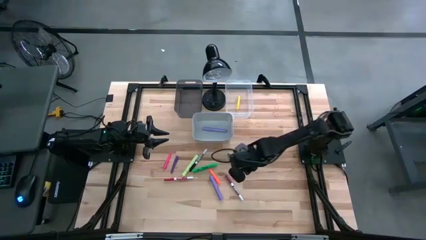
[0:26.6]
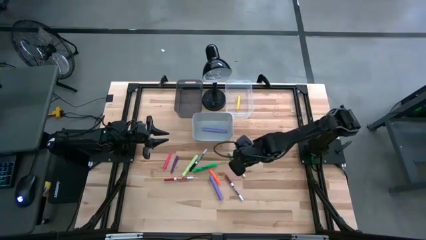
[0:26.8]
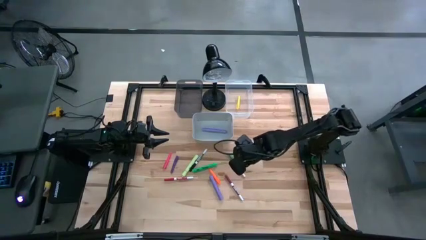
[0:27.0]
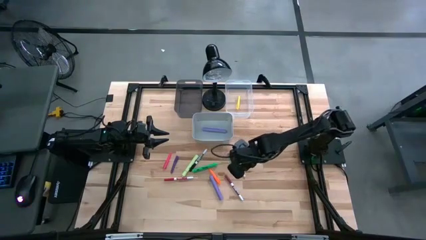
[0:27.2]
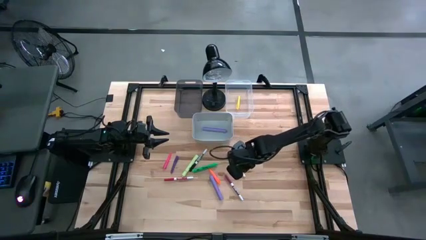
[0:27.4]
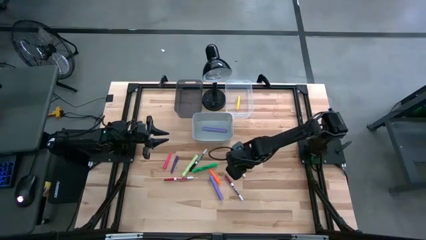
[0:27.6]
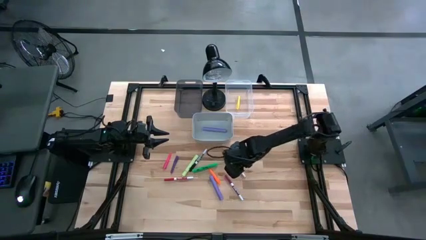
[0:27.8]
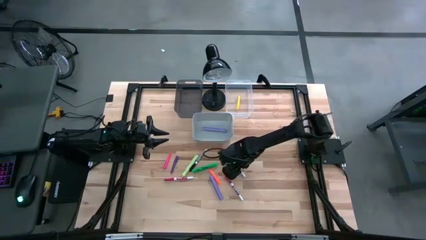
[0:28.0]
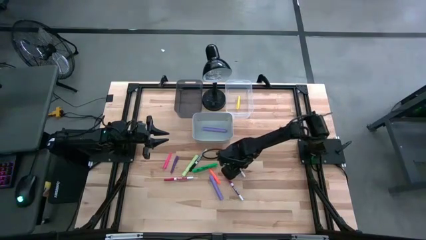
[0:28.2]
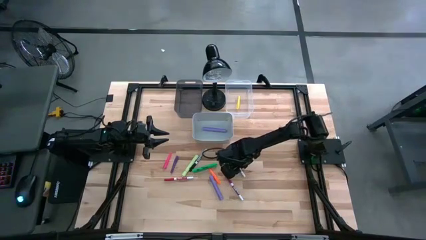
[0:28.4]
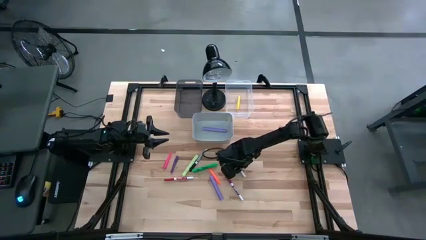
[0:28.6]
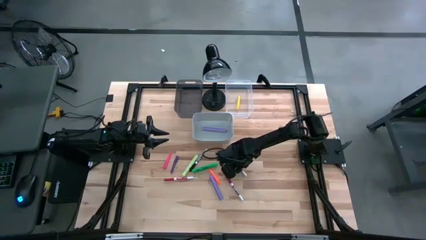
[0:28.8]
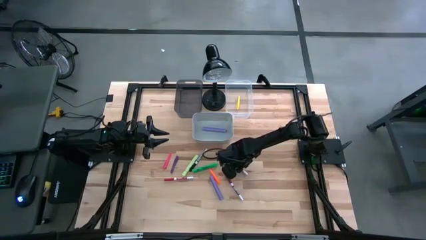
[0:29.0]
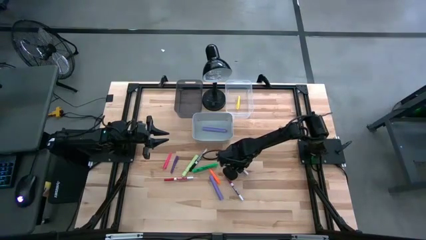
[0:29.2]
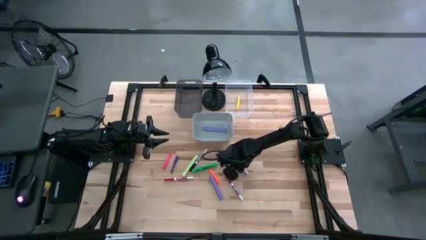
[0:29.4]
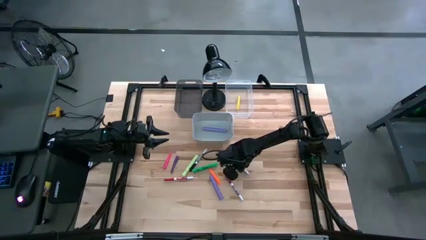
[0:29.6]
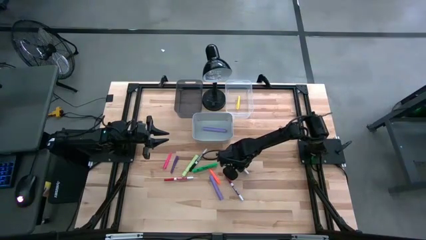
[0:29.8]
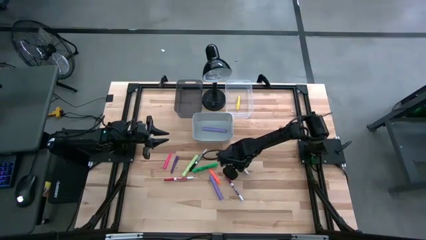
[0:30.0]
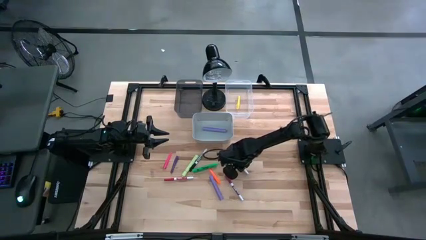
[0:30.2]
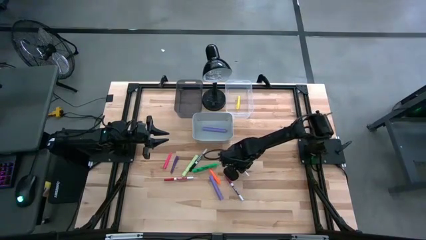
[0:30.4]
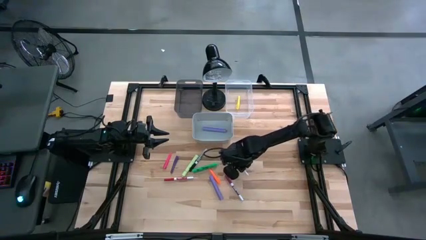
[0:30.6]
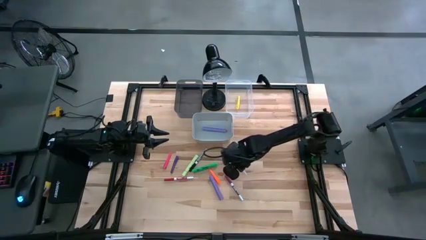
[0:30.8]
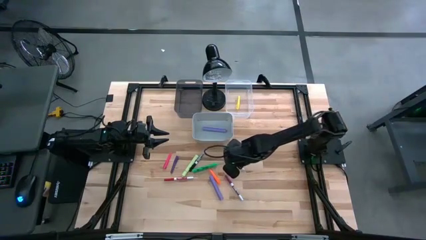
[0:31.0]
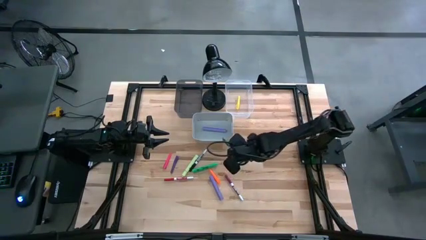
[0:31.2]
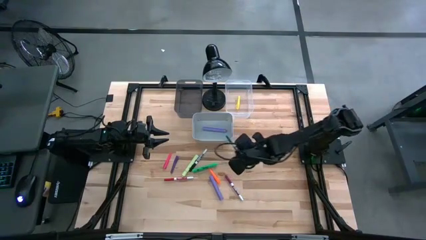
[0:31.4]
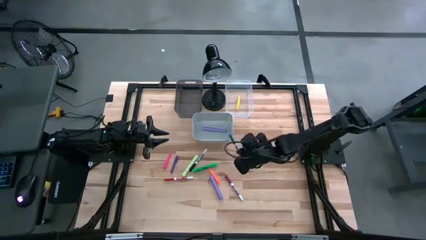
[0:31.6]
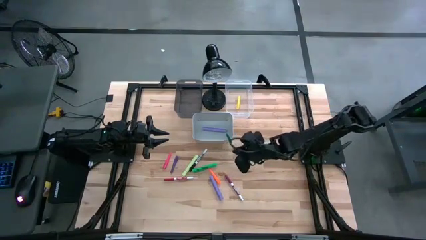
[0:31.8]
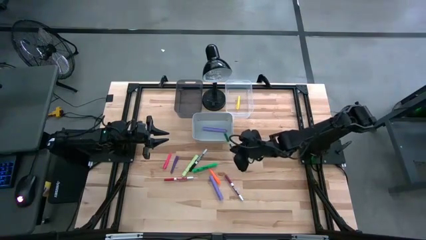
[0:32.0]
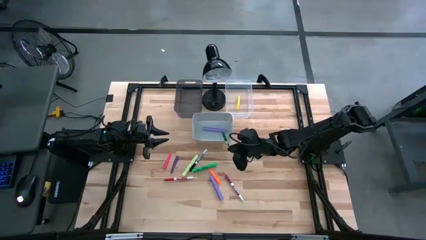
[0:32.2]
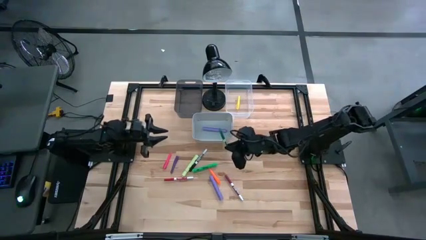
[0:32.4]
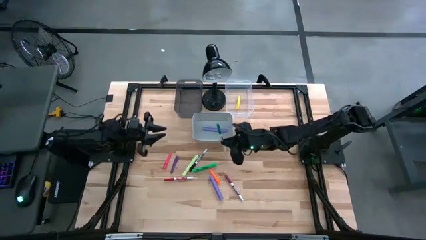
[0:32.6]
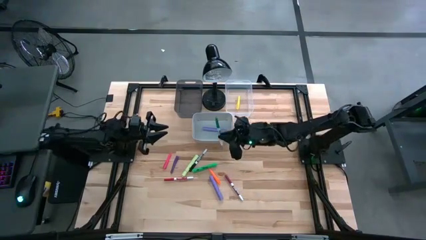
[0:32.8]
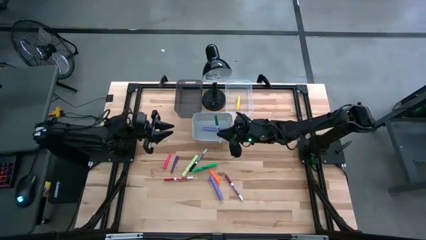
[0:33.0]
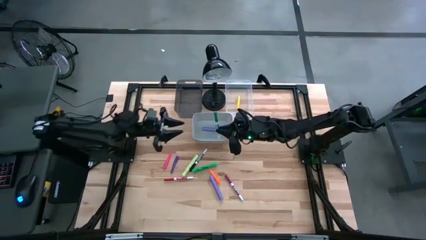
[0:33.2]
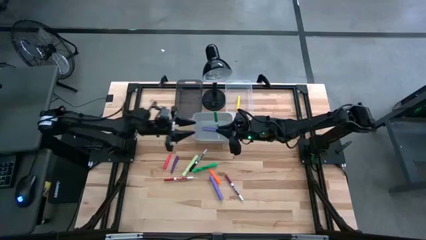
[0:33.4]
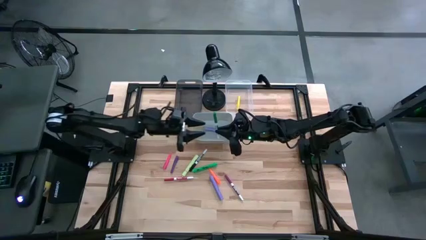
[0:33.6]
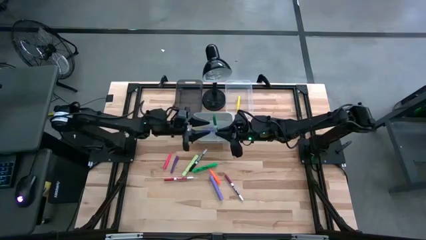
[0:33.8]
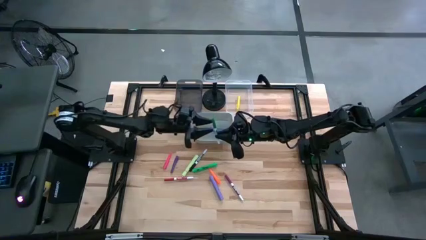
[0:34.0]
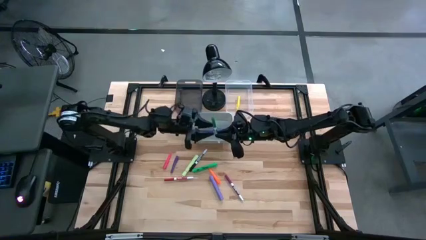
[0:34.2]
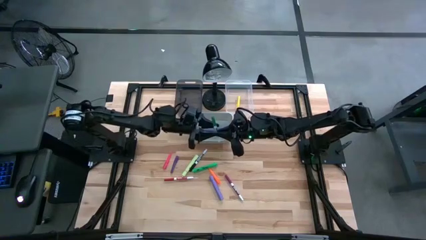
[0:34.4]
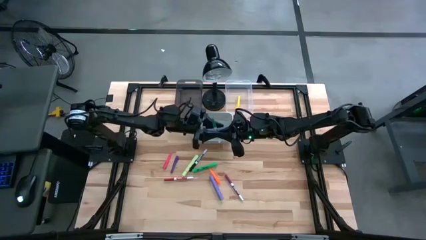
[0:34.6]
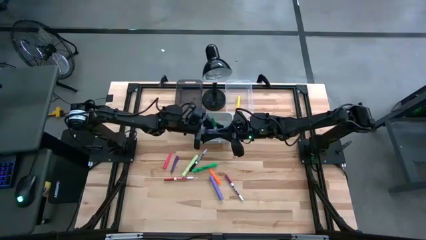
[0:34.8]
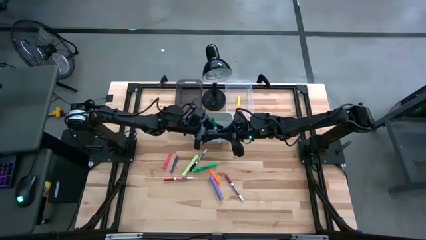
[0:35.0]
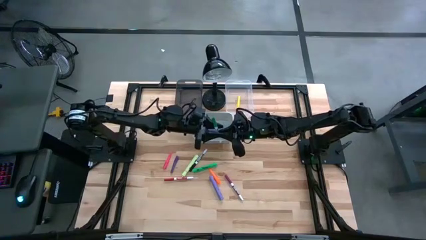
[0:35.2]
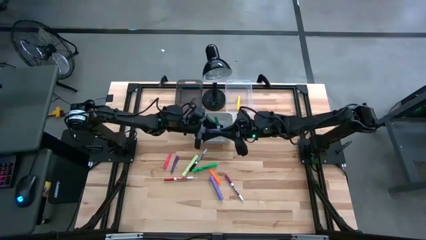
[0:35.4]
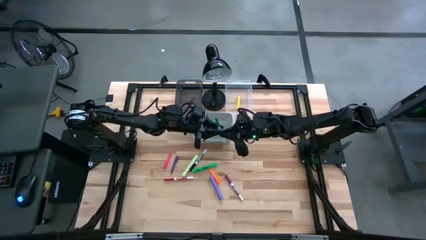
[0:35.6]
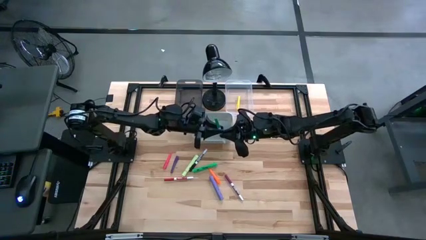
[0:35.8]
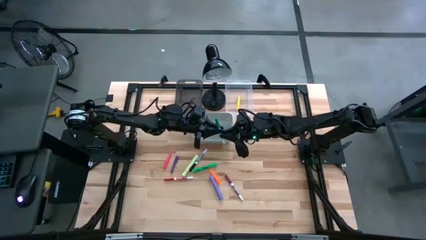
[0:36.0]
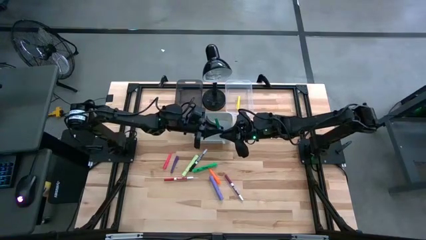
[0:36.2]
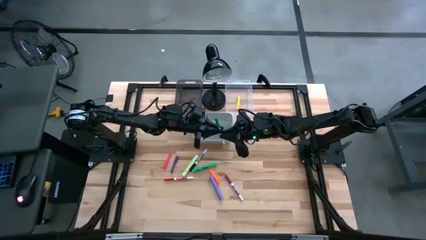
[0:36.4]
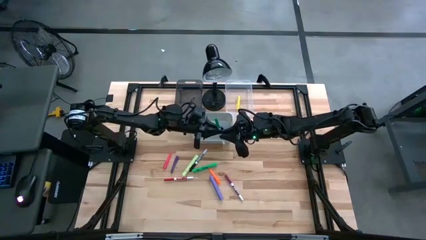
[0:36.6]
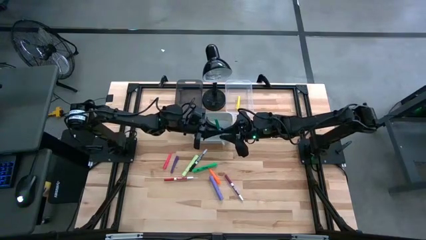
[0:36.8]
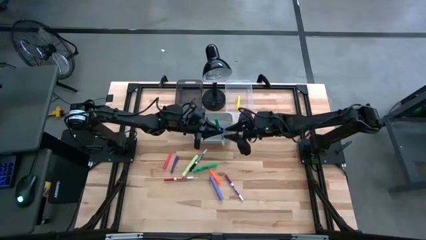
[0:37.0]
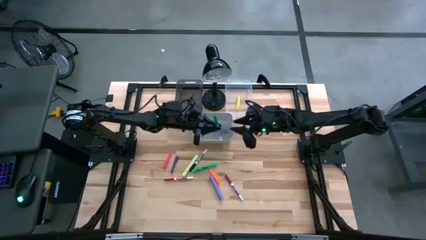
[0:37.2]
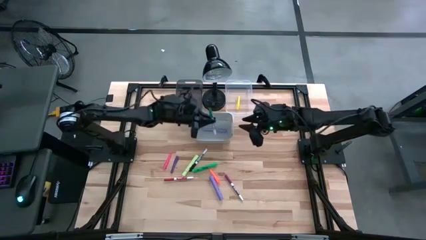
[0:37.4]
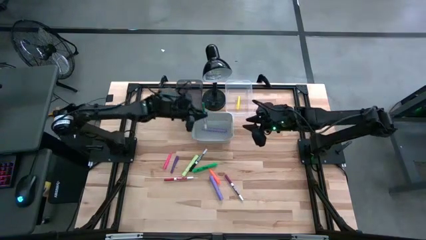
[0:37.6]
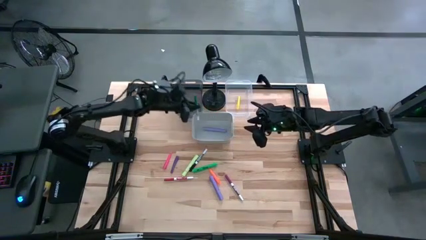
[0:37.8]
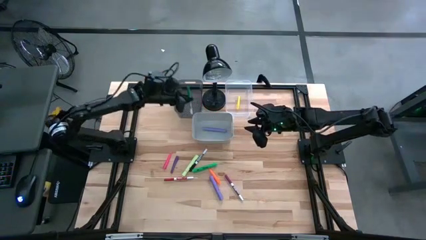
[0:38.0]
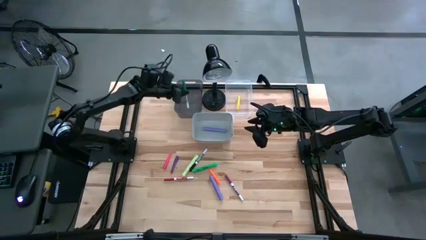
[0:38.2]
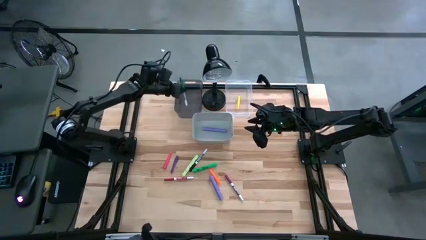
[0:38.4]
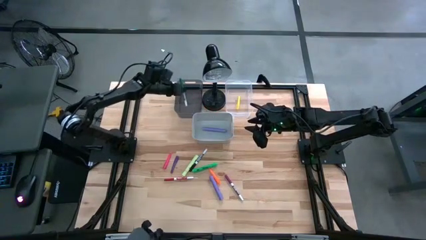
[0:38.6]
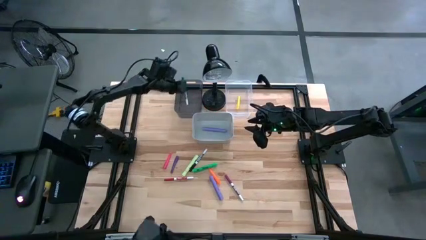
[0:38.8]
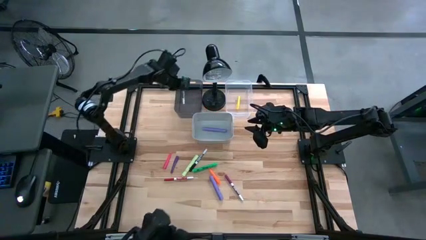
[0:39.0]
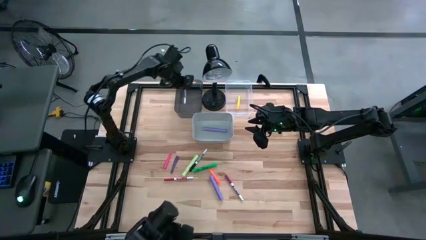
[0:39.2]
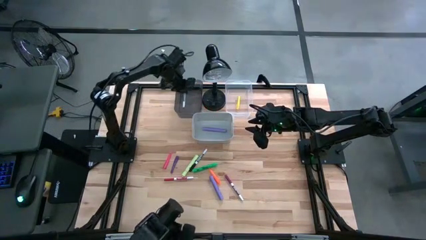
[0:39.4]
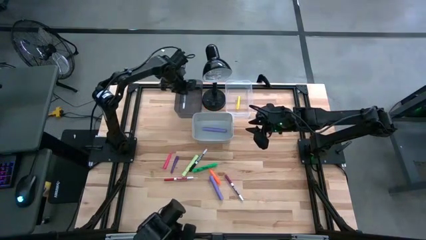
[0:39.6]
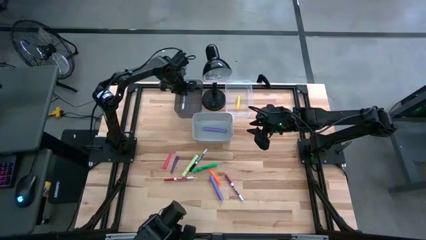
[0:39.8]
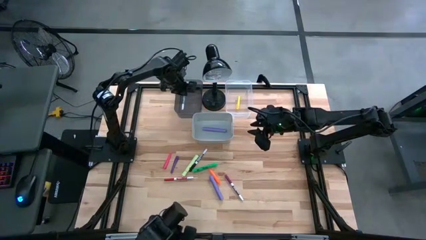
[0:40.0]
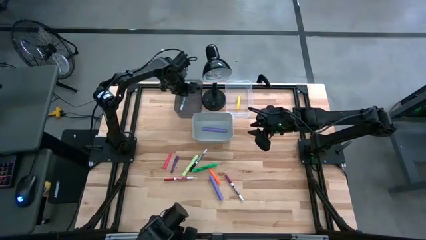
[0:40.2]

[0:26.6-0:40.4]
Task: Pick & Place Markers
Put the medium green marker into the black bin
